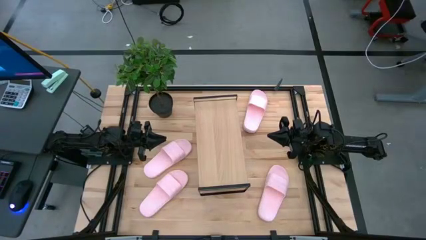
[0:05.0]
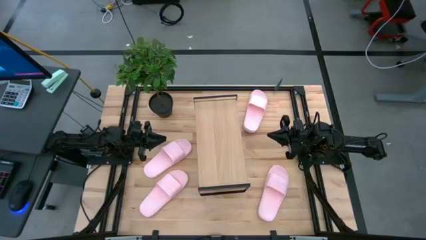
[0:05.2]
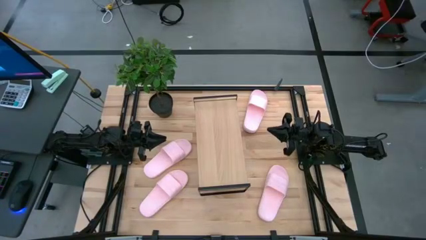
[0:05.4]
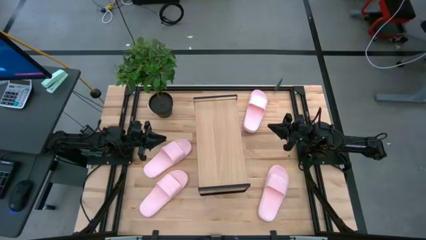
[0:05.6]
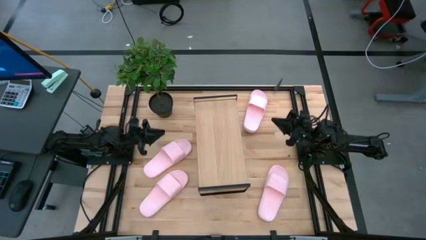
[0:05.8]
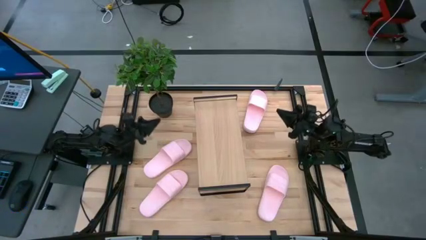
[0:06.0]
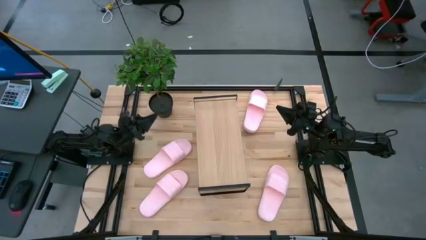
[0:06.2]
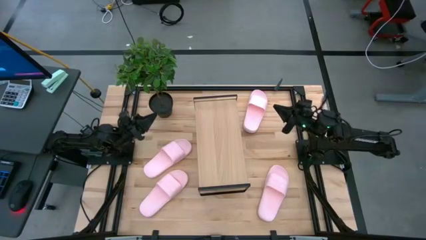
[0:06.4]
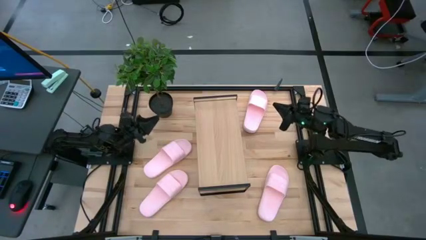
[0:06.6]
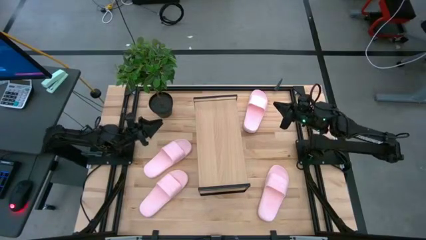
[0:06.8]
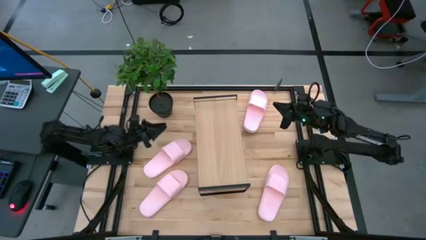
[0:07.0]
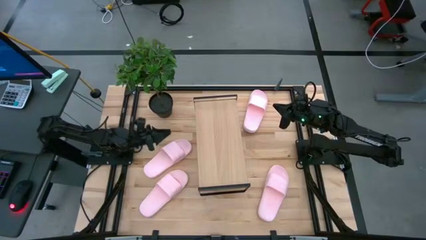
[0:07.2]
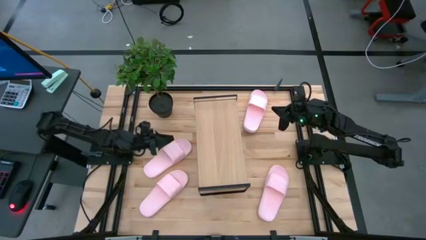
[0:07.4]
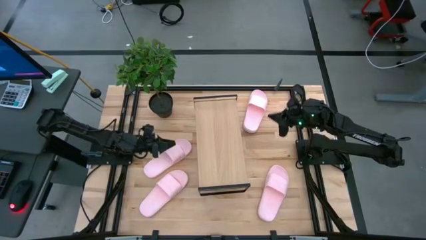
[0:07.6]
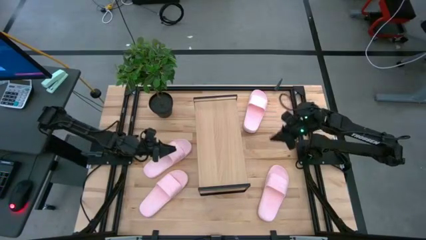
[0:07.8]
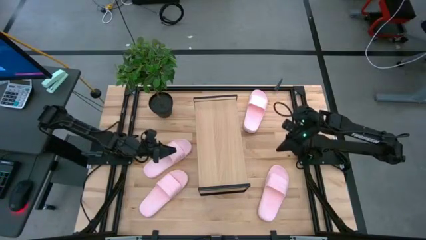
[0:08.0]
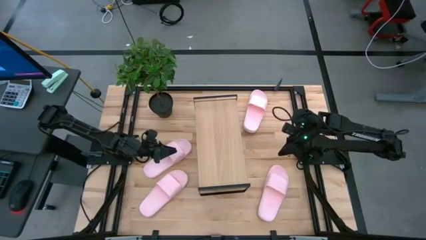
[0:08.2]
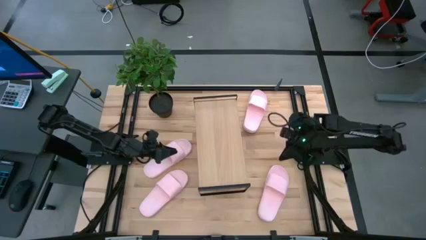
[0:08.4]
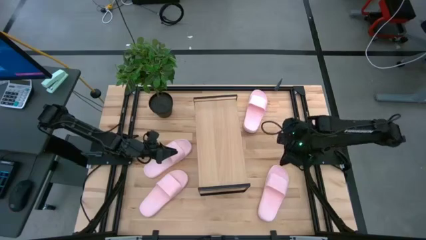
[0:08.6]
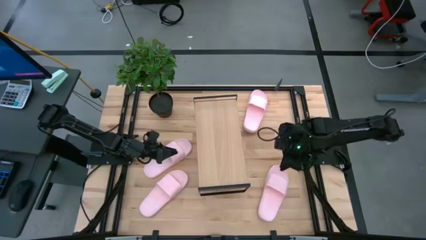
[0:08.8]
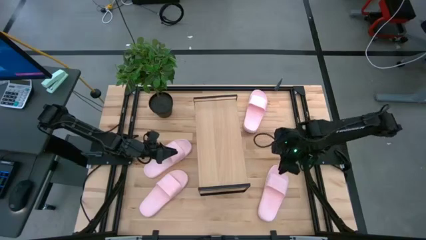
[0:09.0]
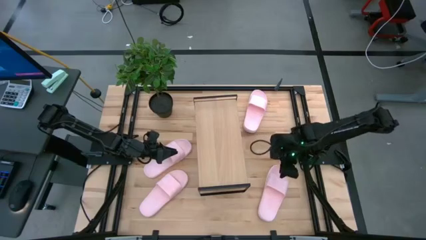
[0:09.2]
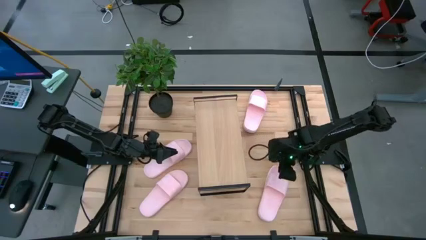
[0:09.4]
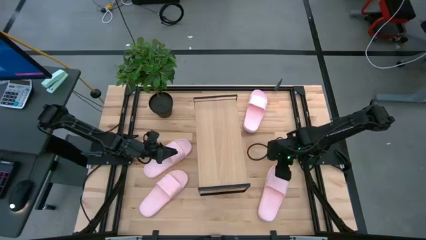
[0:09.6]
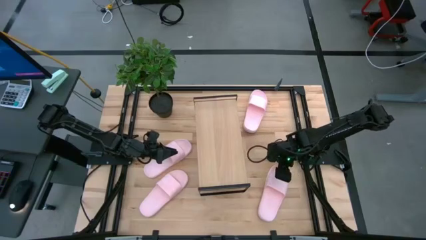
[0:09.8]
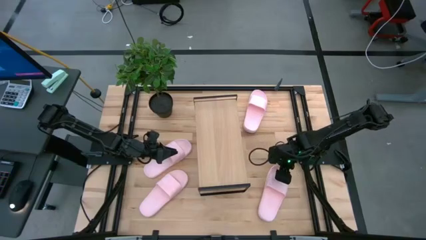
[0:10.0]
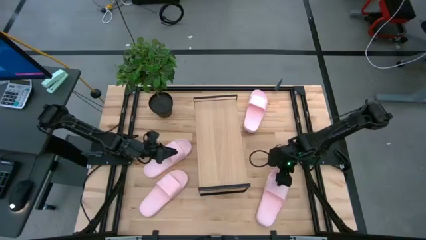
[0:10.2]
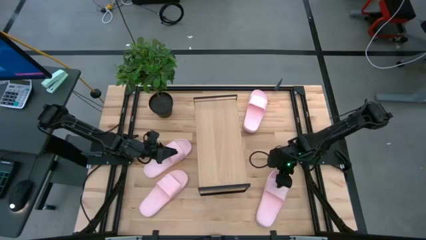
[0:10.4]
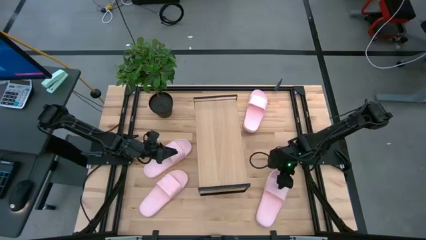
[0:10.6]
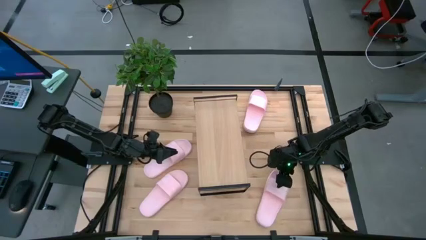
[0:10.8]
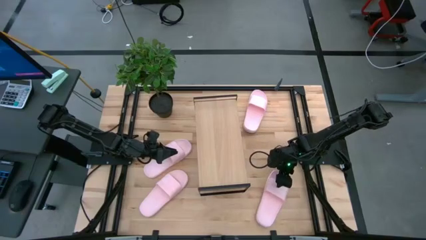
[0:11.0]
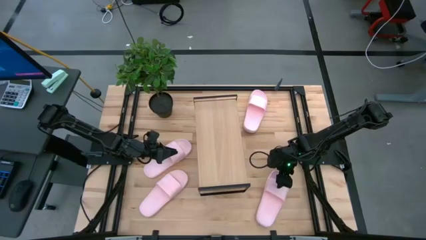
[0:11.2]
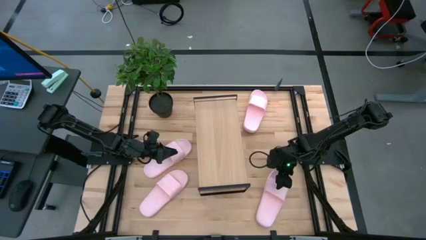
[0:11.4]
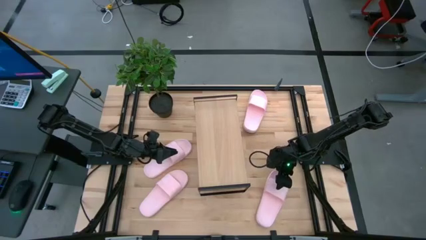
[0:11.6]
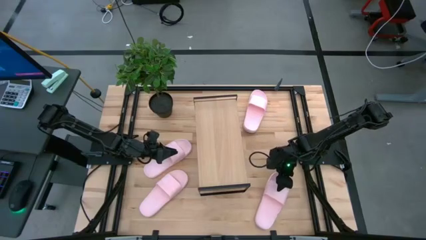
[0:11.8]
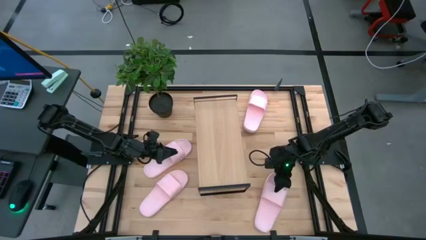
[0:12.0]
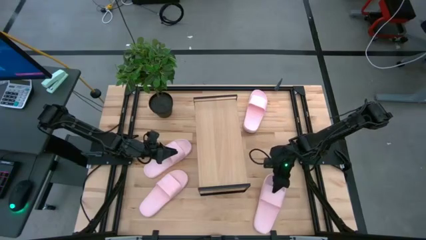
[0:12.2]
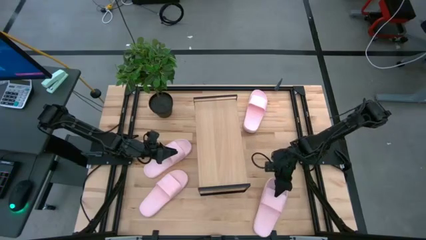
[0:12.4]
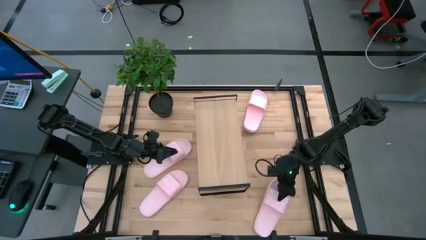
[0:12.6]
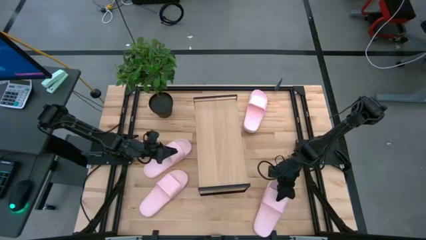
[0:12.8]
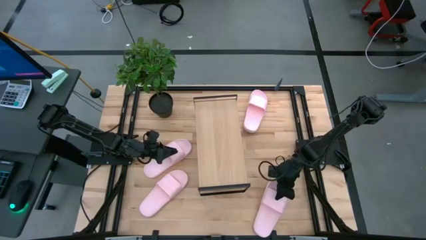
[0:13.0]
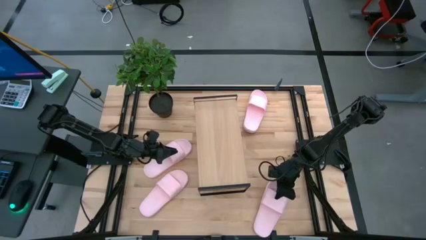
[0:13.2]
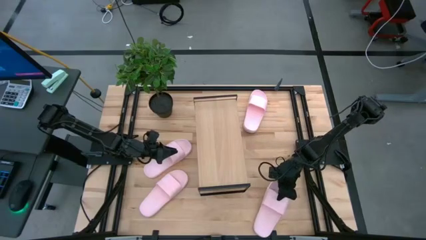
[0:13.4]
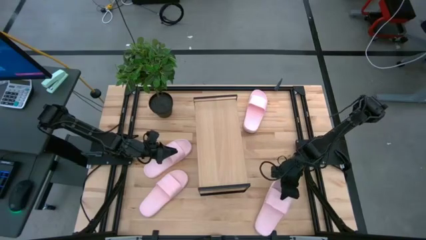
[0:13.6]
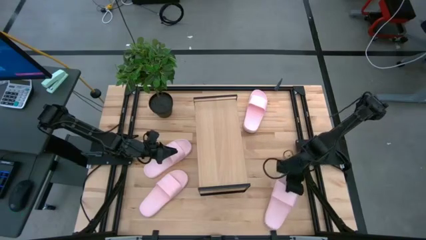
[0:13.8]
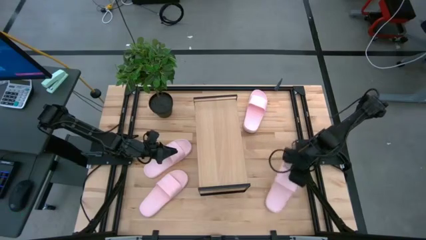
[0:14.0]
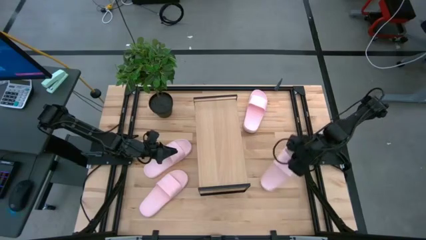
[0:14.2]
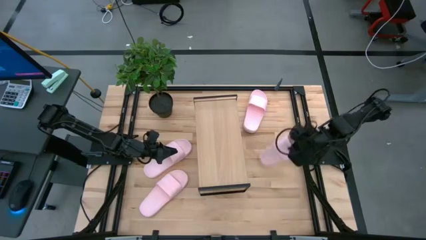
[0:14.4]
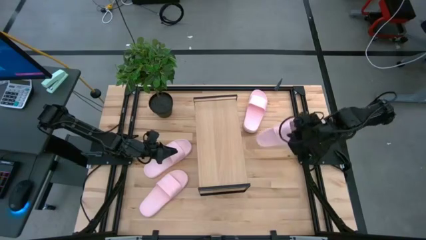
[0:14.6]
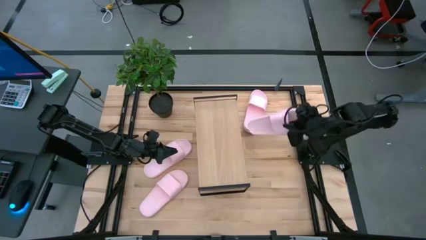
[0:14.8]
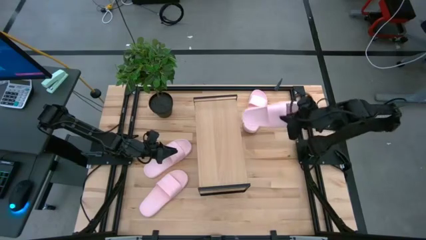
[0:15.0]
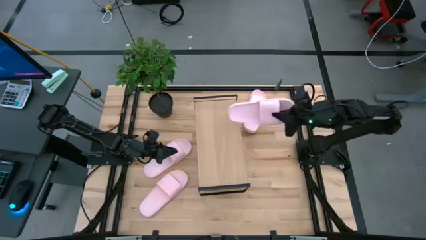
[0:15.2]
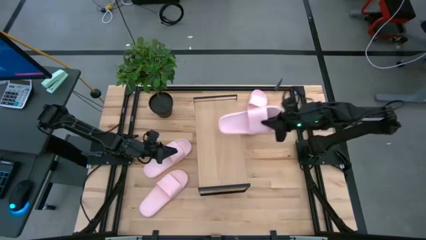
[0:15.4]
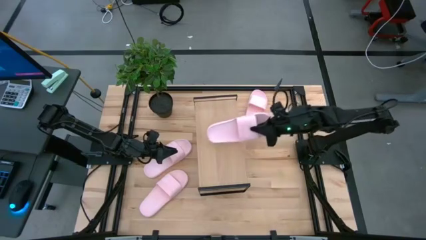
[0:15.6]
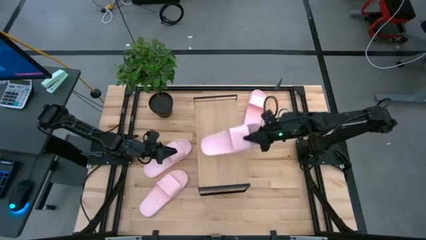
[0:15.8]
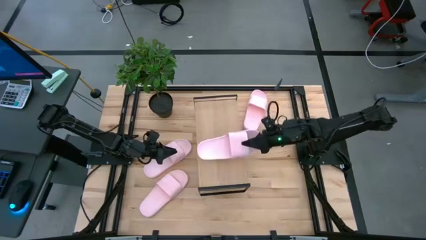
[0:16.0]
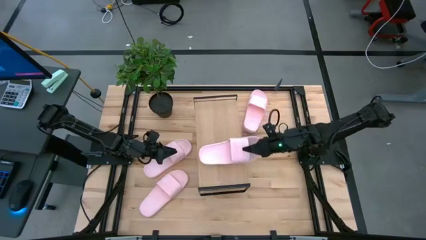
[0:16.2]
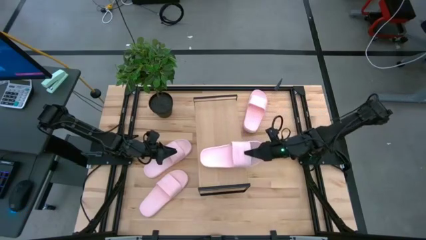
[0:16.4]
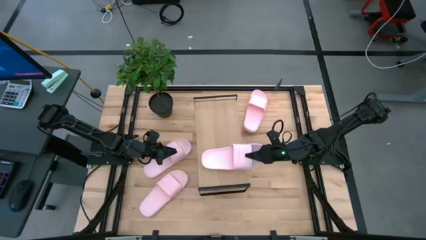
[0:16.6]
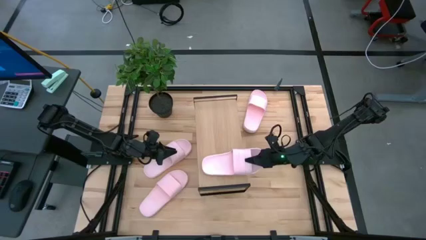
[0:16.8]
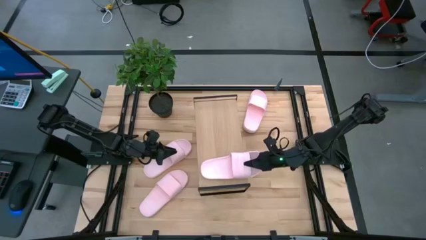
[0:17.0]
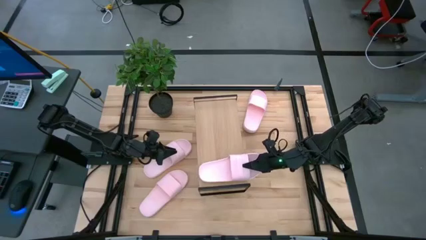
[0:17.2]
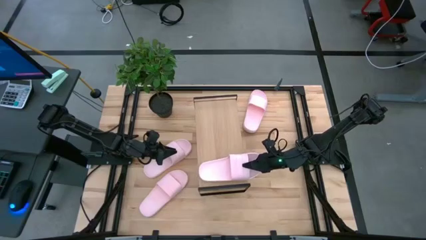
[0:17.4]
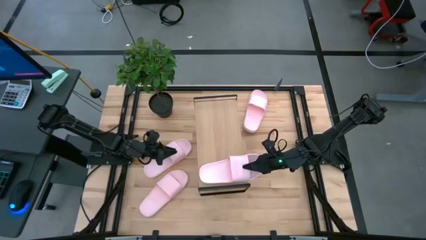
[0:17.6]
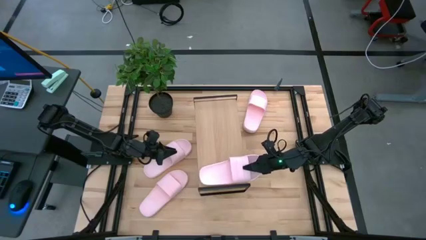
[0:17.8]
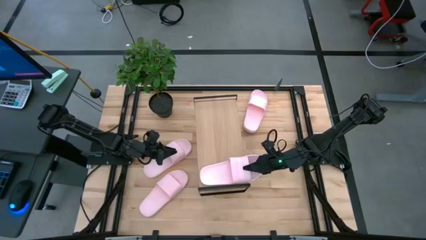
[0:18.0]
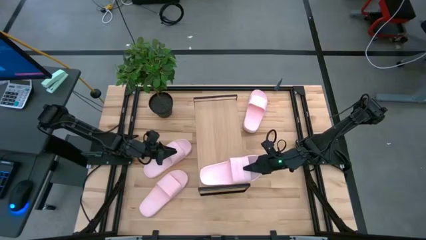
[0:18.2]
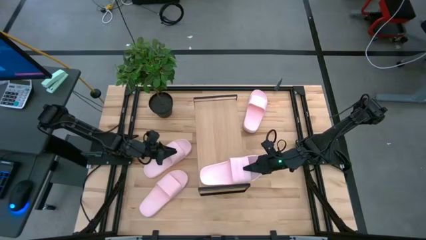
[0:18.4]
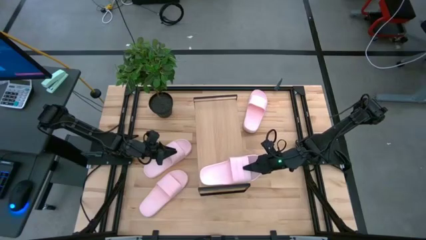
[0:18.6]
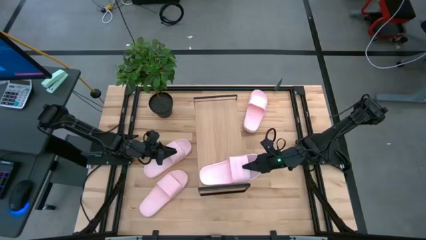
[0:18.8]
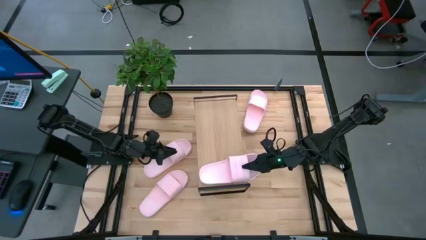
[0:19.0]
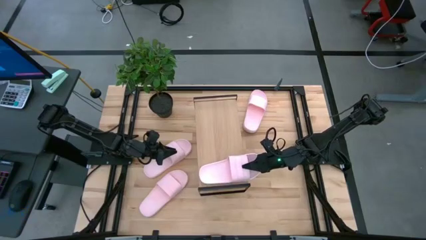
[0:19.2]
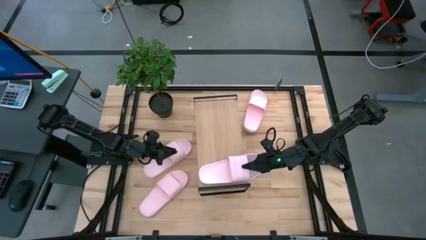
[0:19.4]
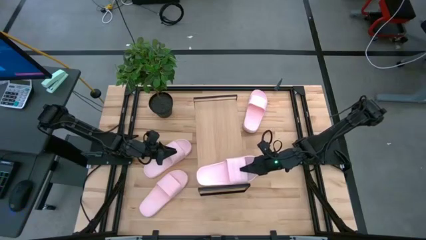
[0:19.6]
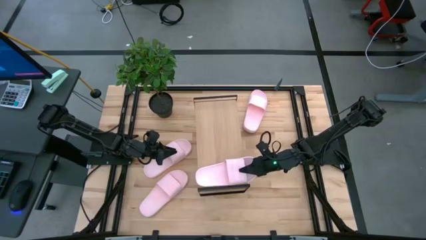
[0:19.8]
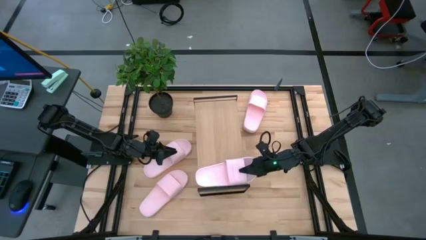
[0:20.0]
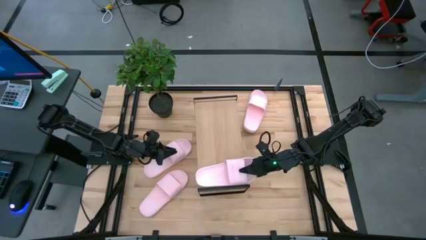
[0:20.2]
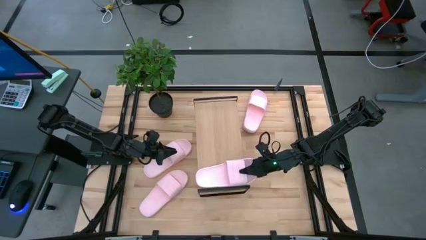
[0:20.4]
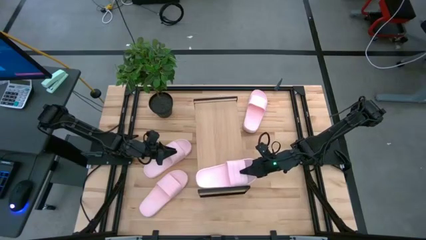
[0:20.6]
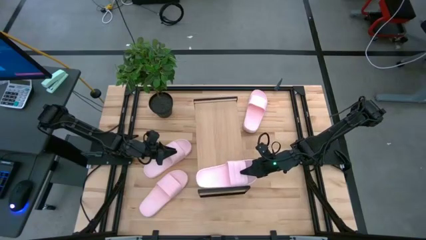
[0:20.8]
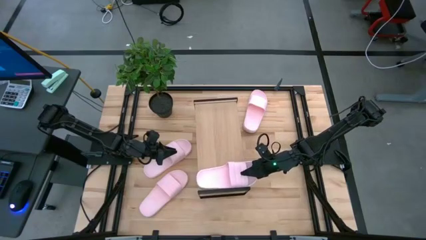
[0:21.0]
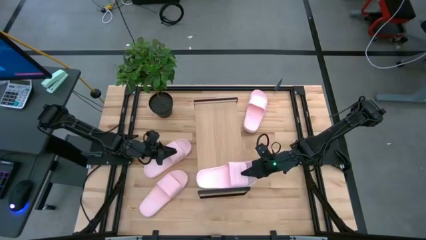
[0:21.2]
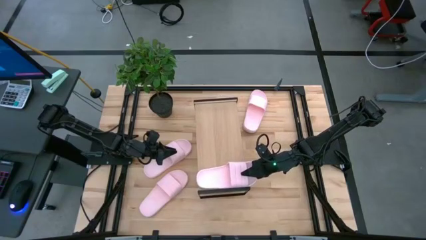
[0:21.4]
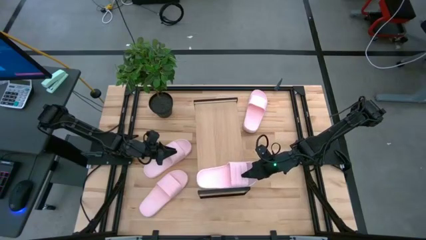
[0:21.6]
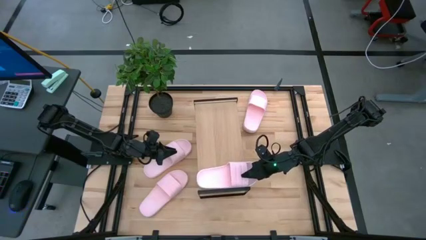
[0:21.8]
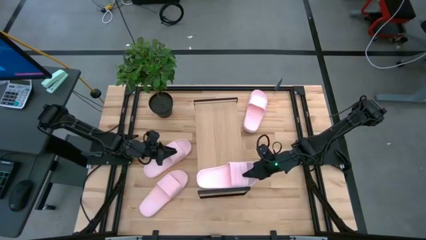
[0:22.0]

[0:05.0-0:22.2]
Task: Pick and place slides into the shelf
Put the bottom right pink slipper on the shelf
